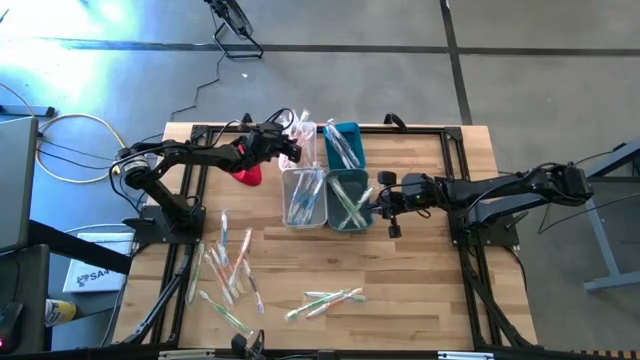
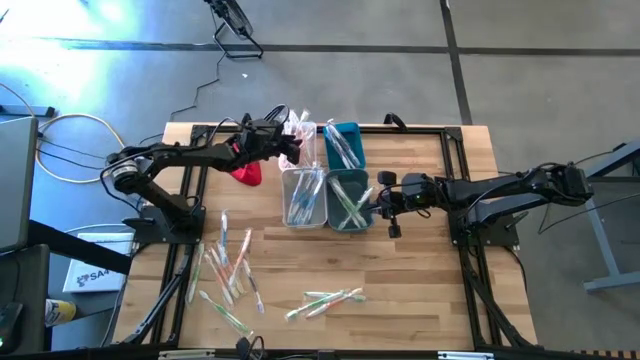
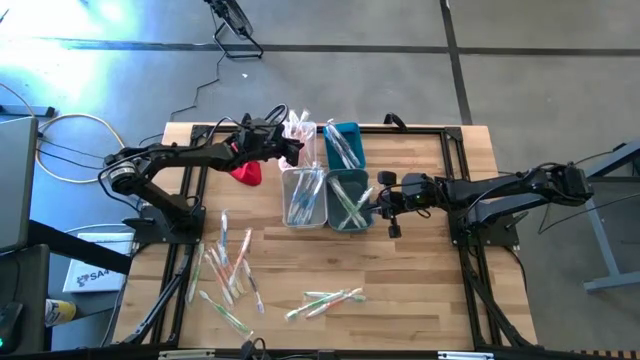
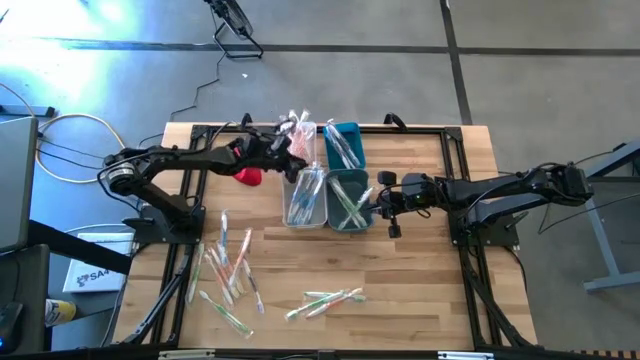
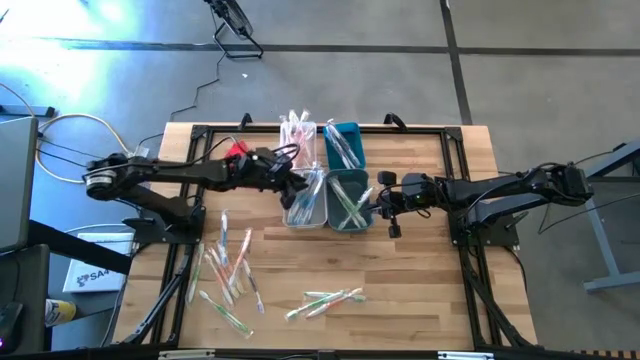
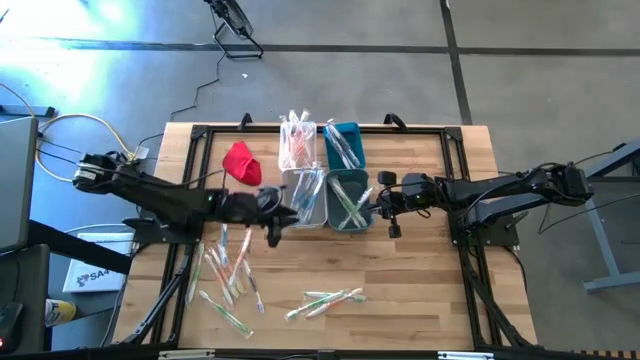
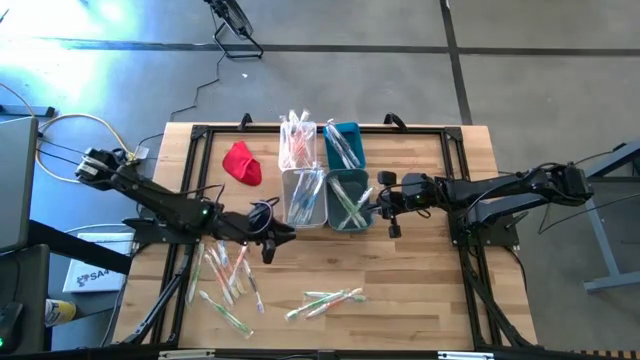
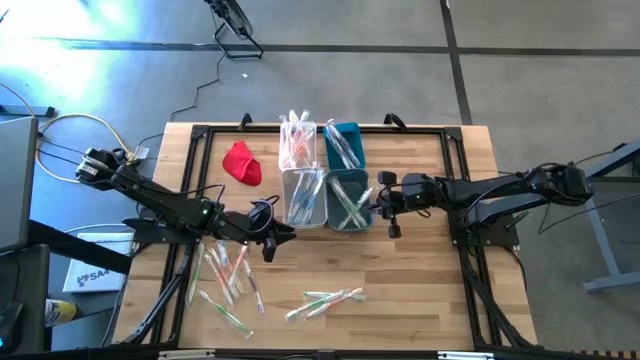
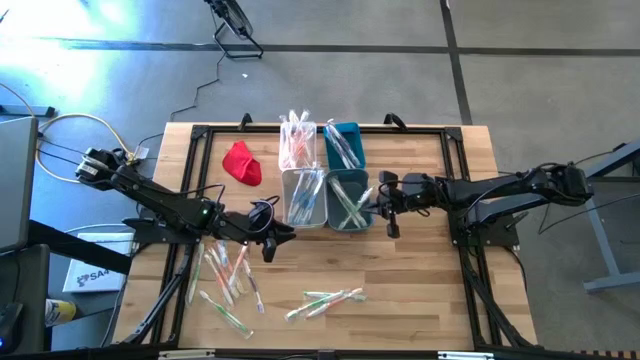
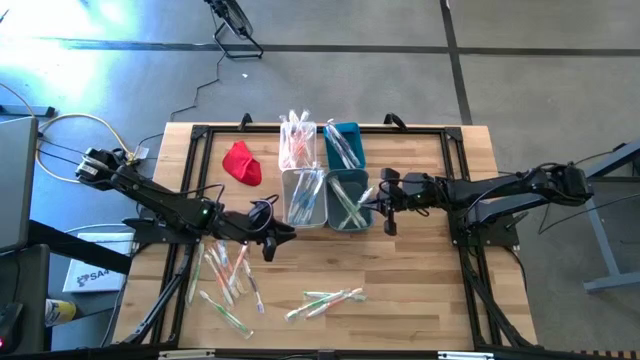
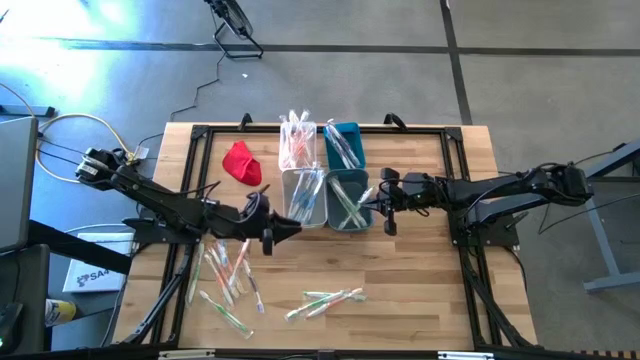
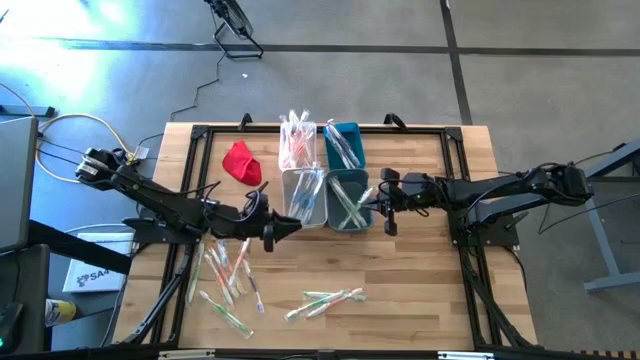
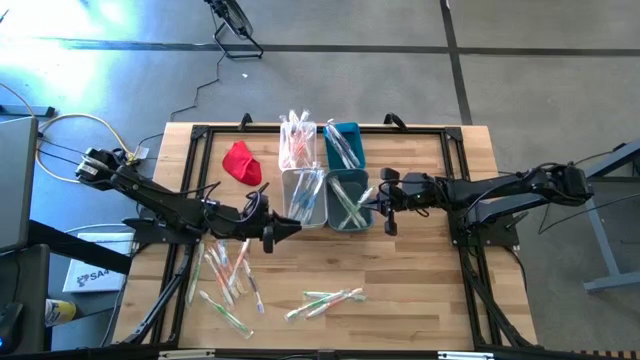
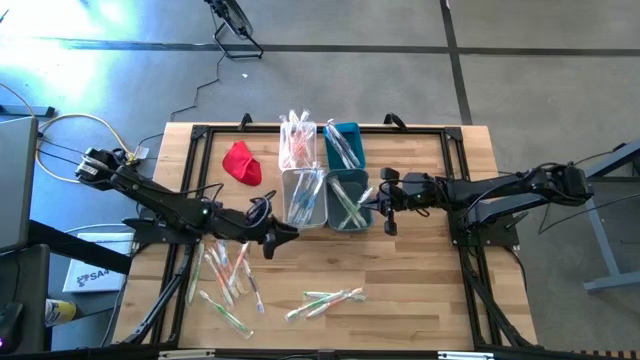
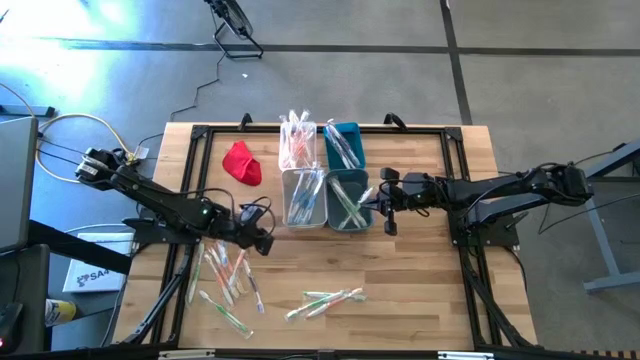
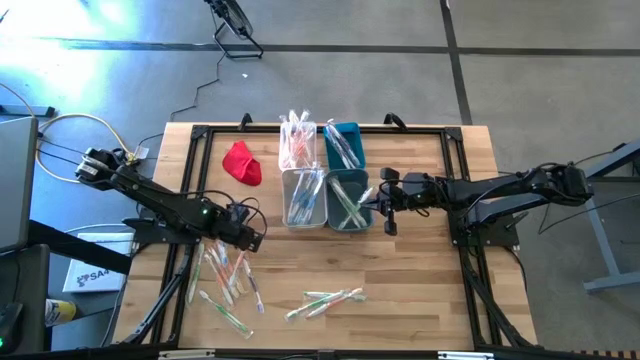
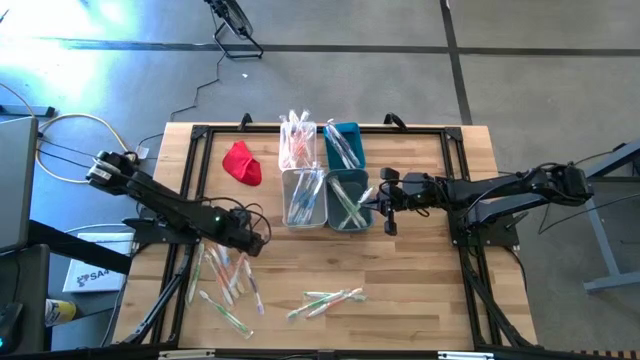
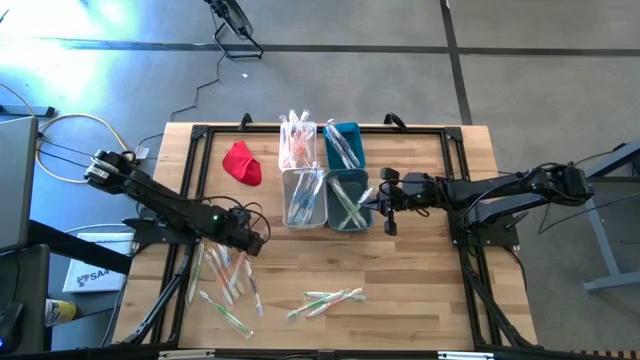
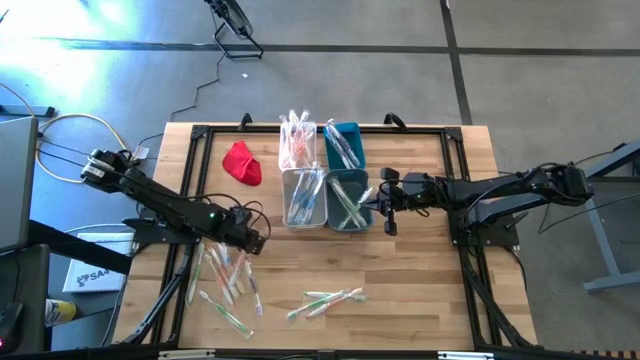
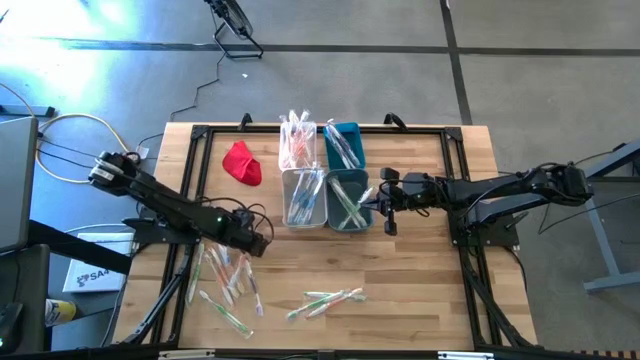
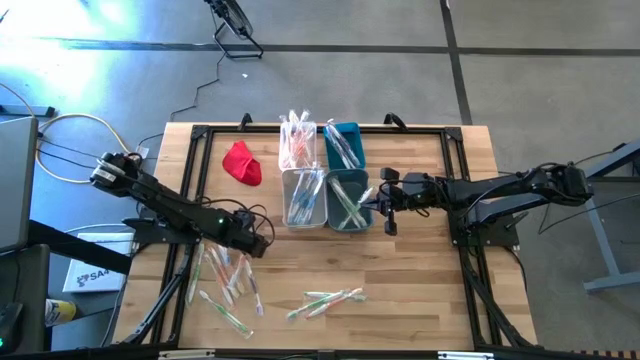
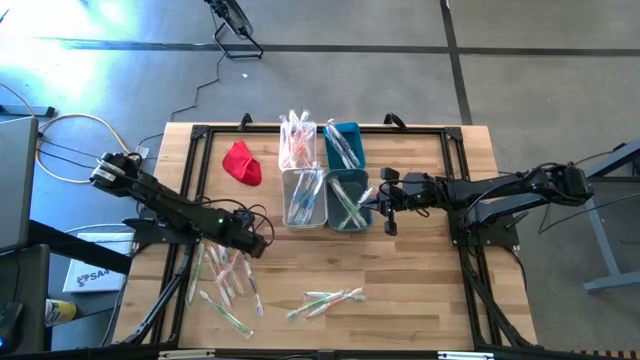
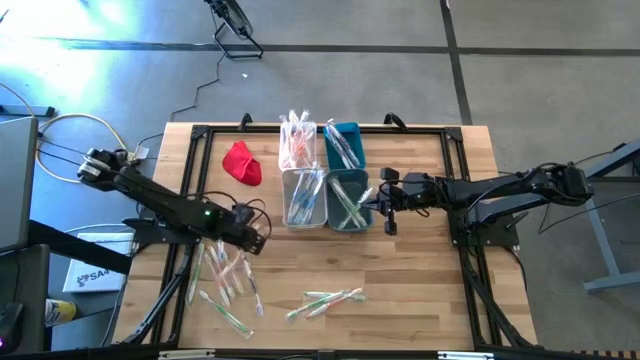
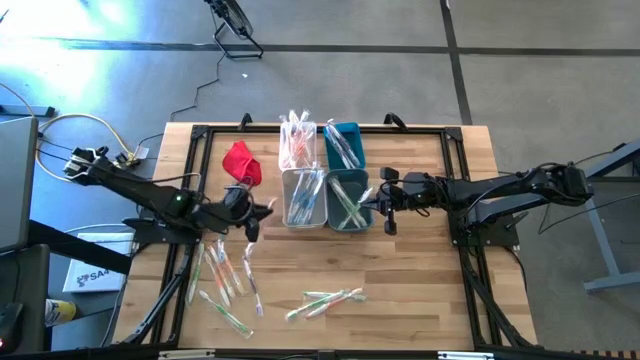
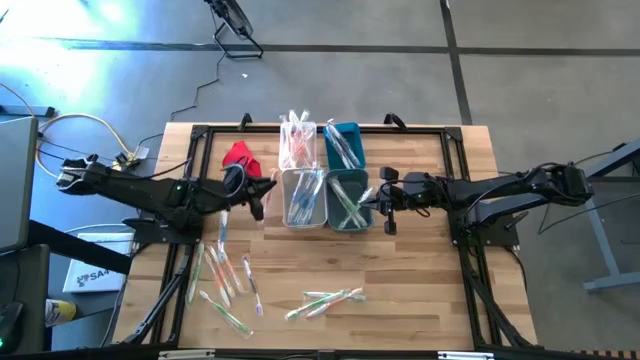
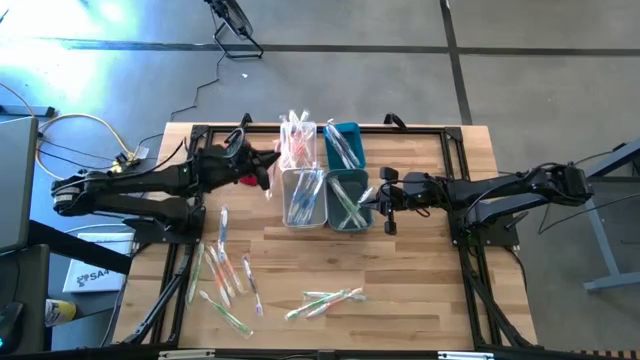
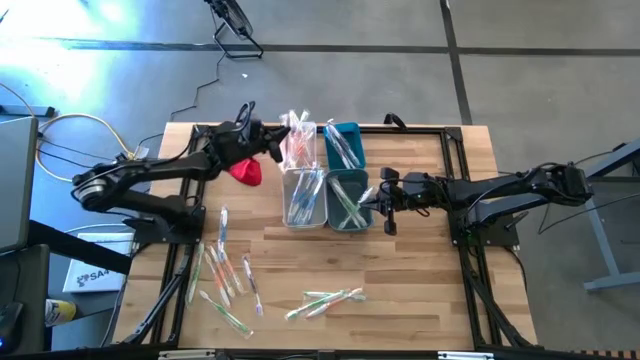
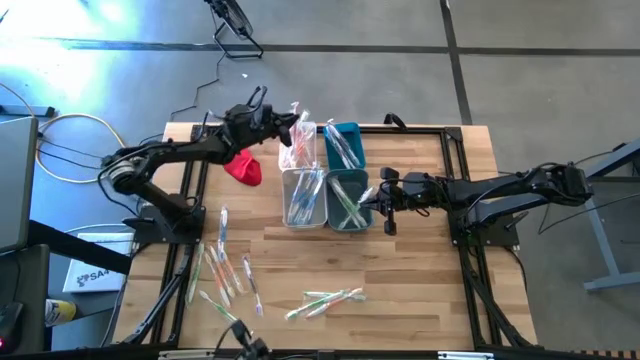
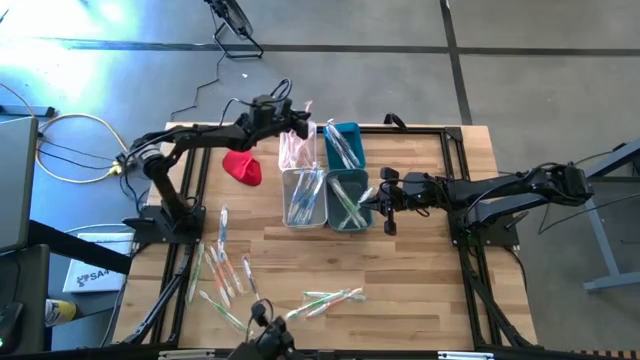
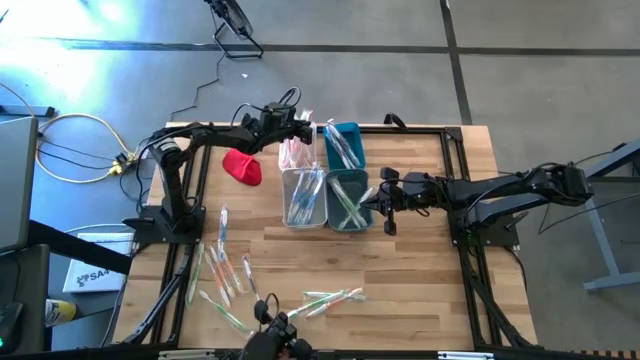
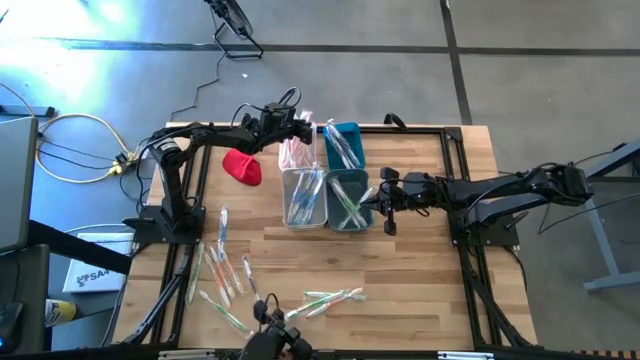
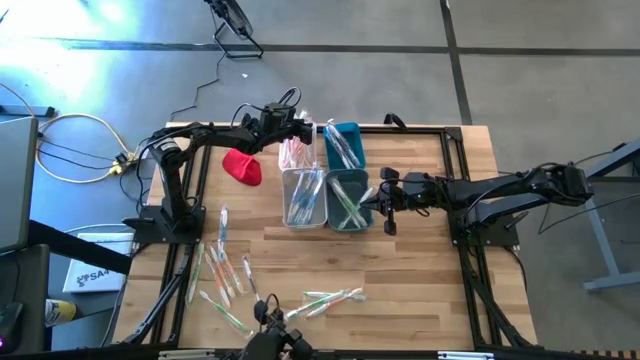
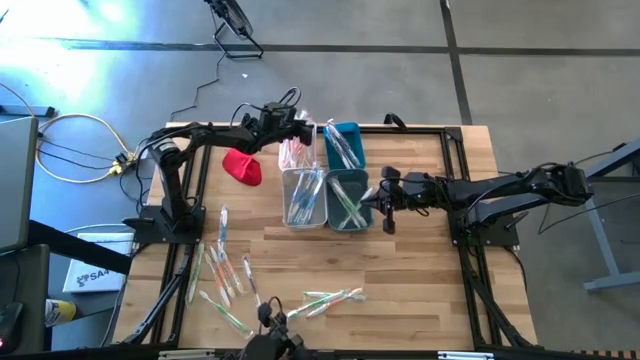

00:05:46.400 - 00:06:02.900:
Task: Pick & Place Toothbrushes
Put the orange toothbrush into the transparent bin

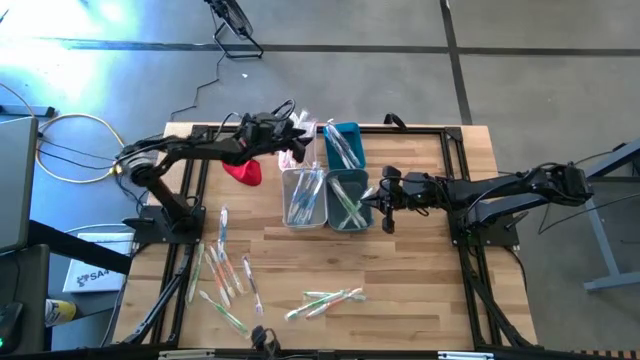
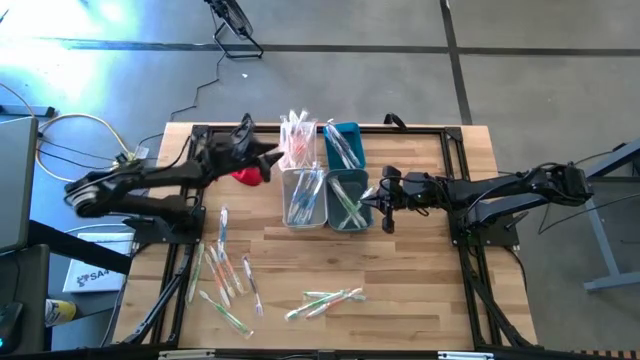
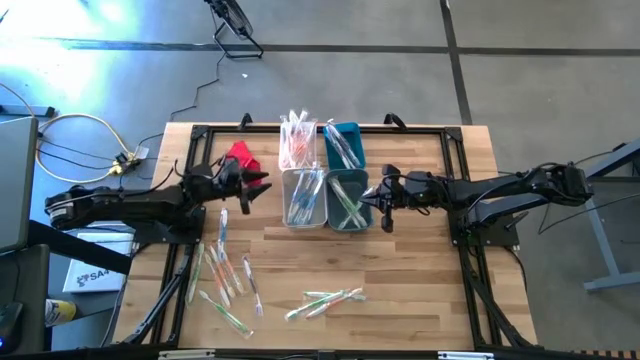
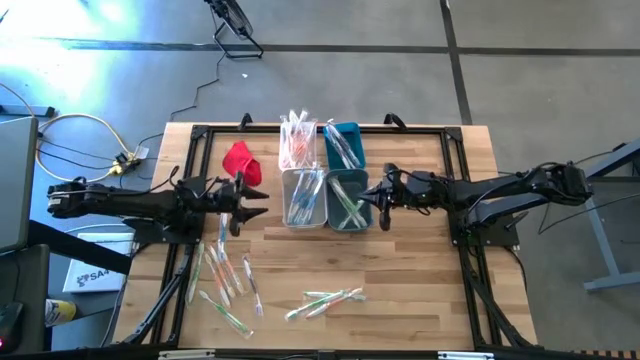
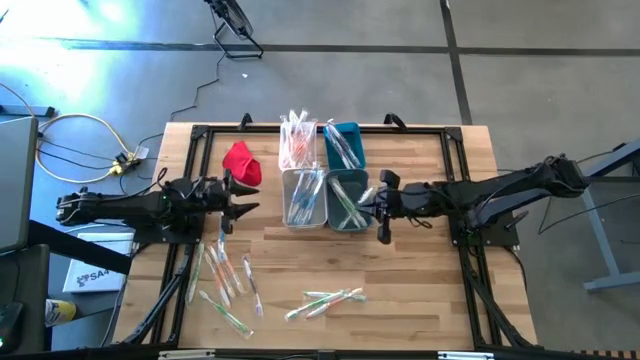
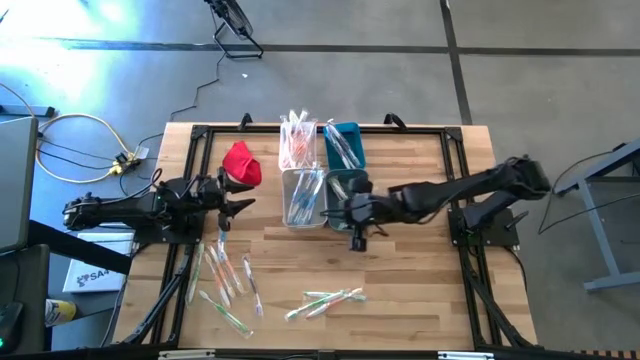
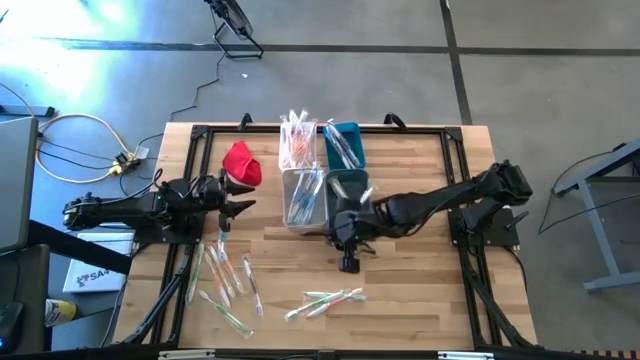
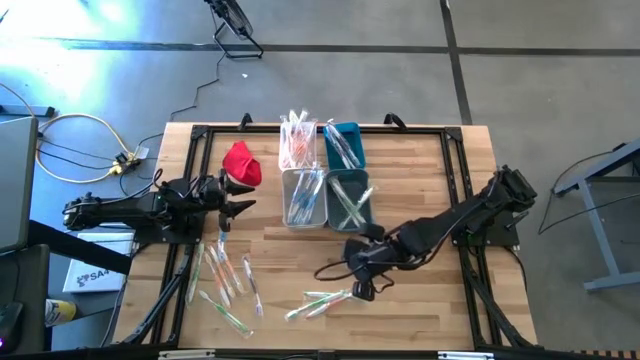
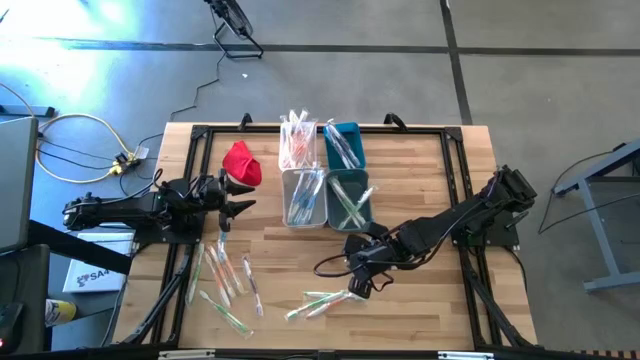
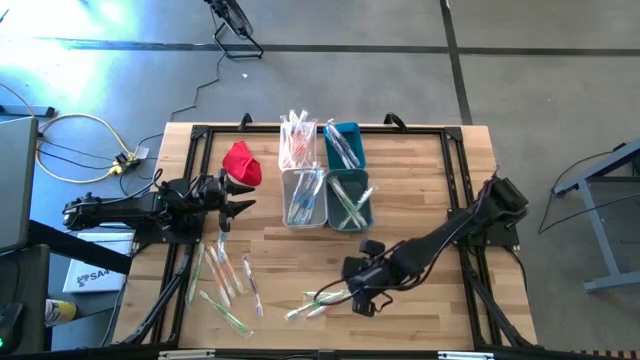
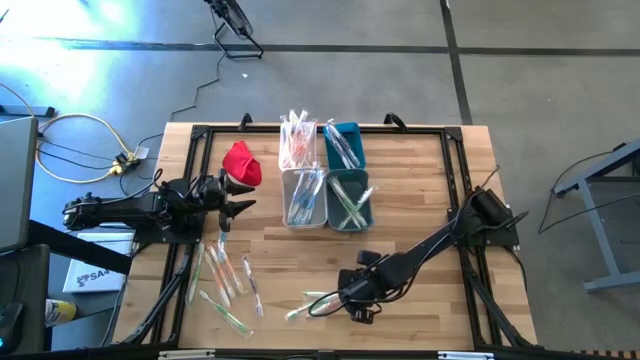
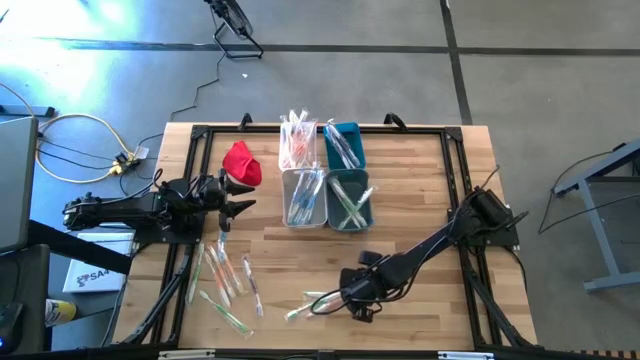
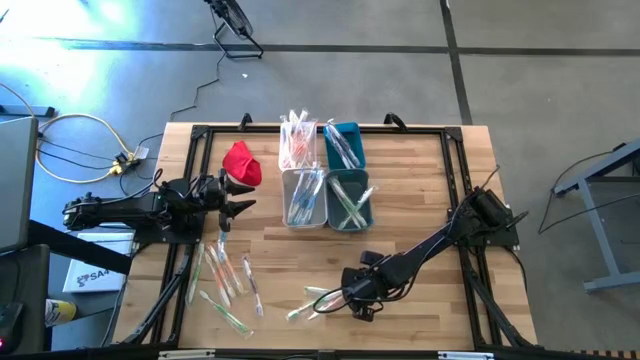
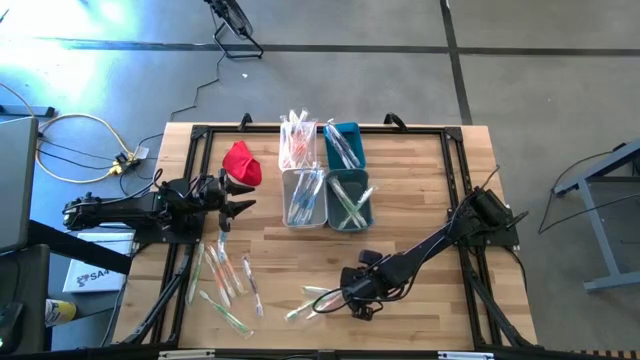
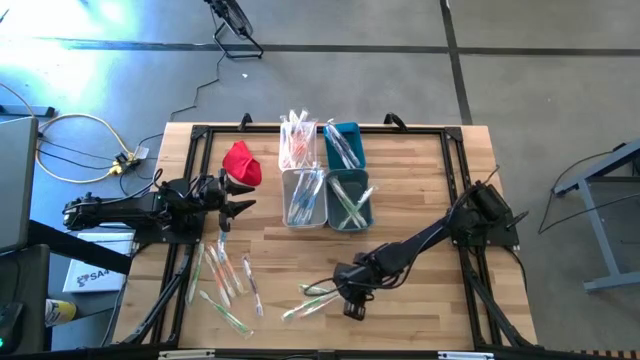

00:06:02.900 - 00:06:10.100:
Put the orange toothbrush into the transparent bin
